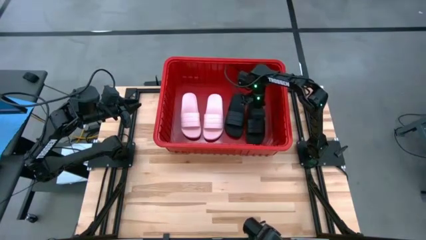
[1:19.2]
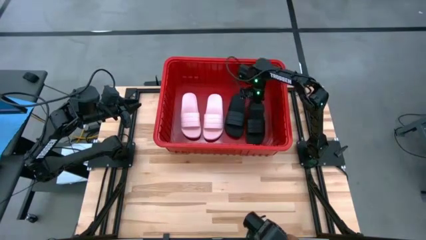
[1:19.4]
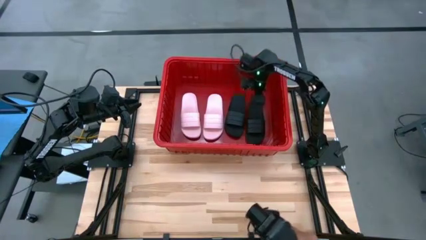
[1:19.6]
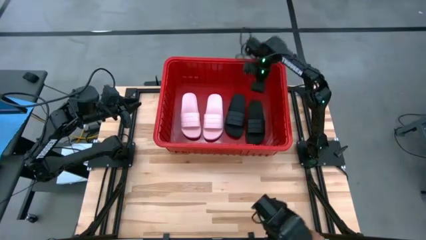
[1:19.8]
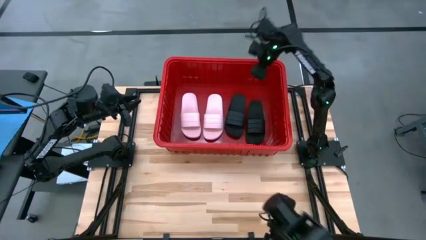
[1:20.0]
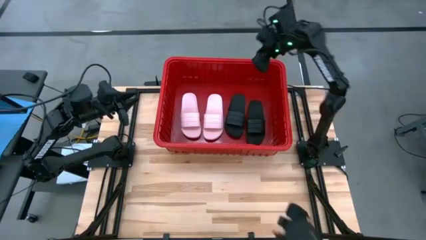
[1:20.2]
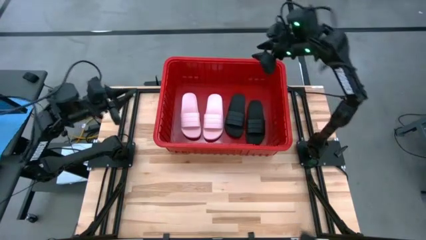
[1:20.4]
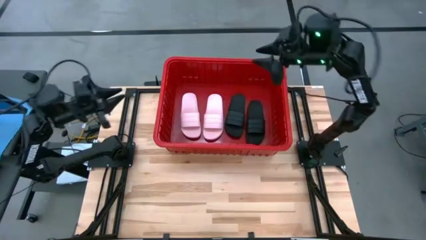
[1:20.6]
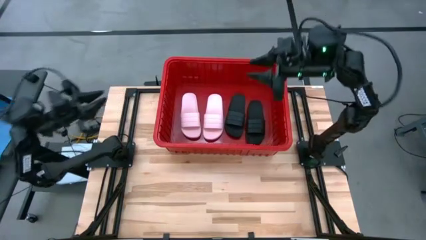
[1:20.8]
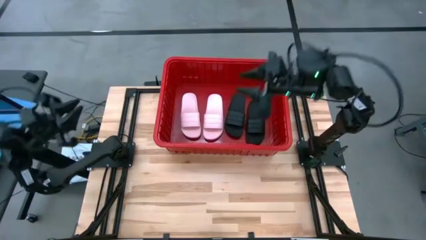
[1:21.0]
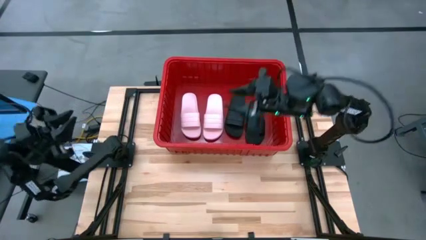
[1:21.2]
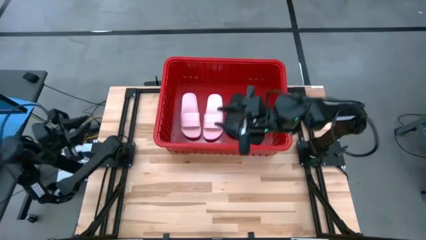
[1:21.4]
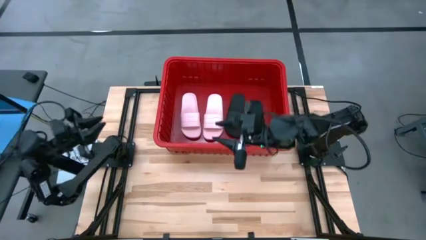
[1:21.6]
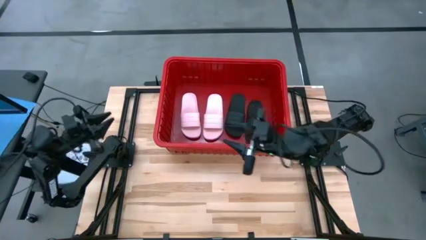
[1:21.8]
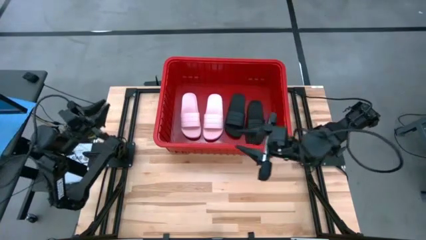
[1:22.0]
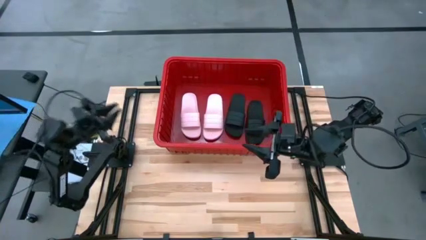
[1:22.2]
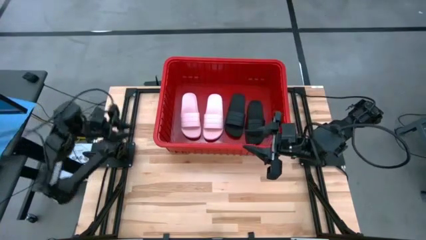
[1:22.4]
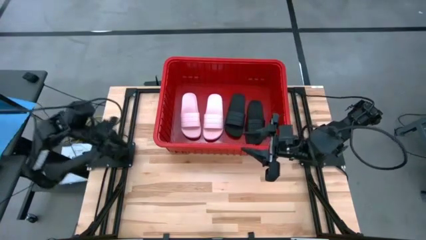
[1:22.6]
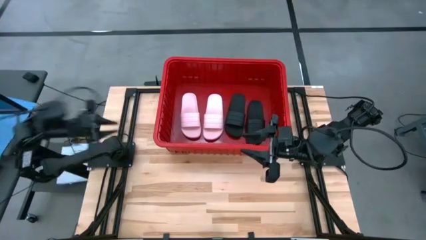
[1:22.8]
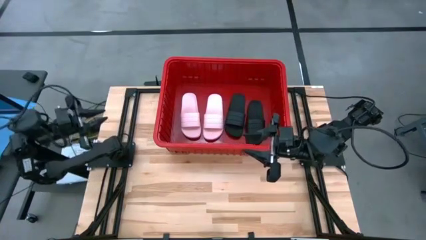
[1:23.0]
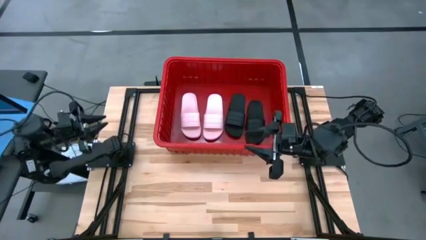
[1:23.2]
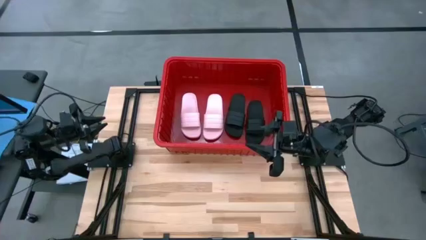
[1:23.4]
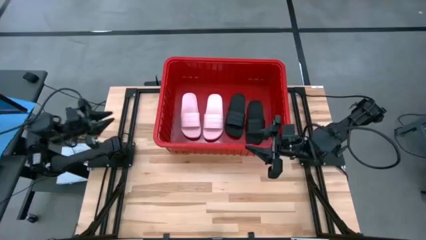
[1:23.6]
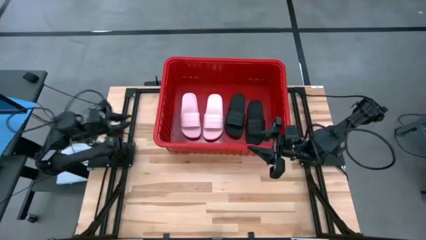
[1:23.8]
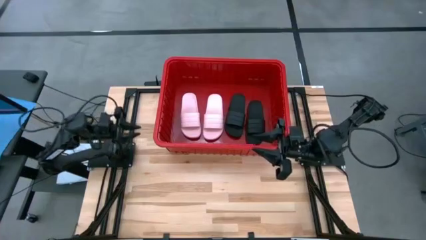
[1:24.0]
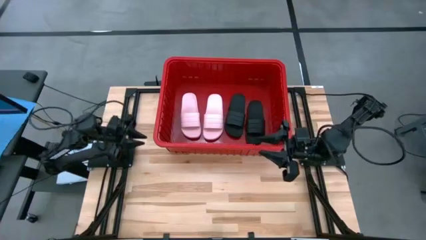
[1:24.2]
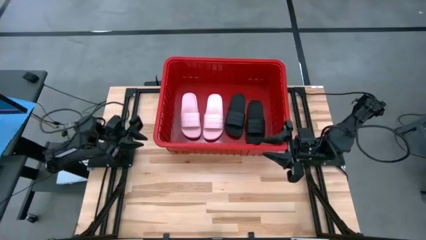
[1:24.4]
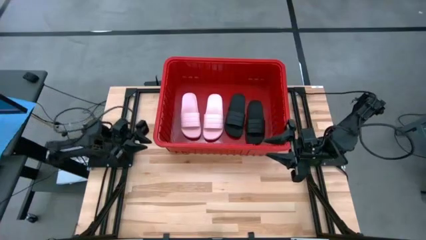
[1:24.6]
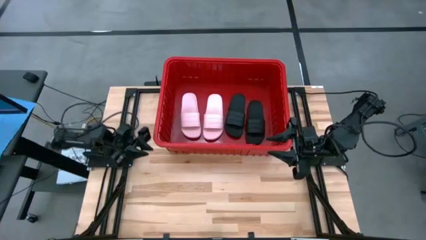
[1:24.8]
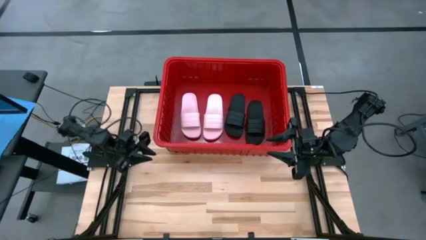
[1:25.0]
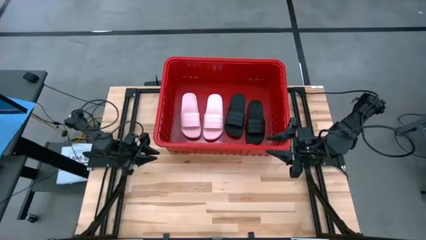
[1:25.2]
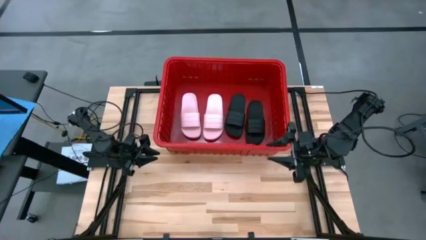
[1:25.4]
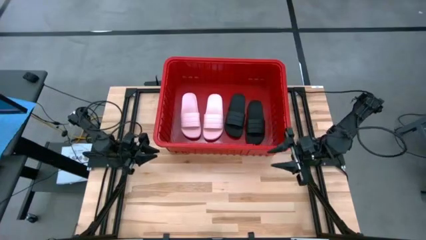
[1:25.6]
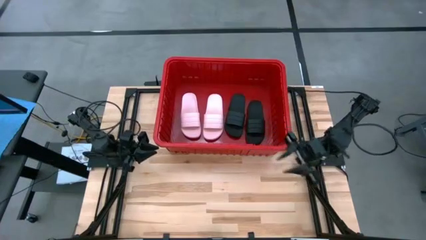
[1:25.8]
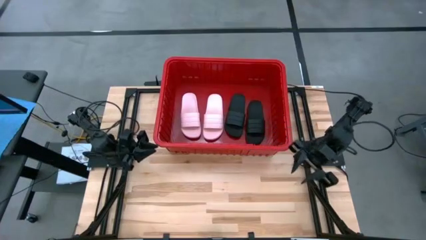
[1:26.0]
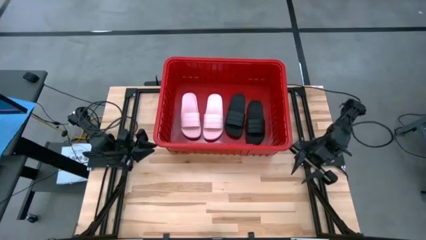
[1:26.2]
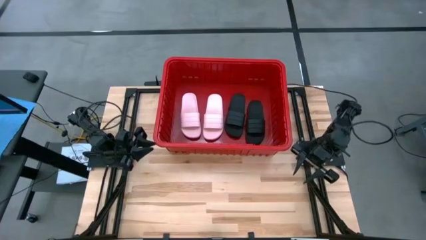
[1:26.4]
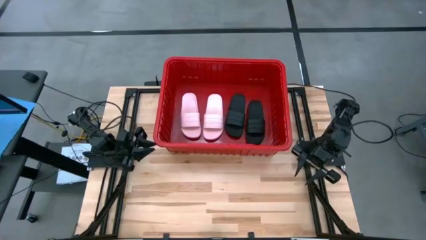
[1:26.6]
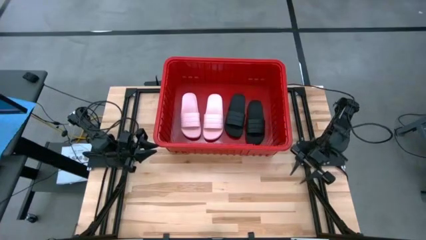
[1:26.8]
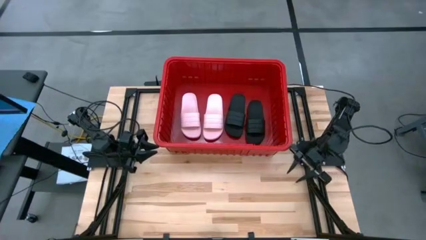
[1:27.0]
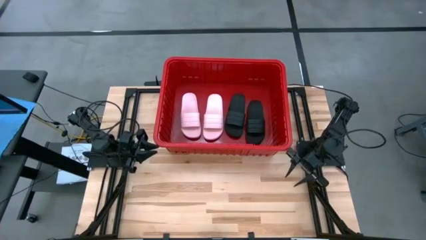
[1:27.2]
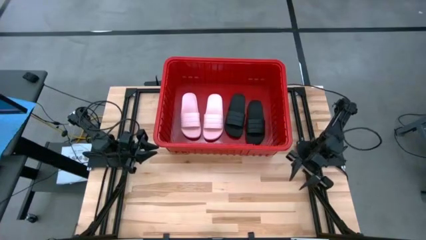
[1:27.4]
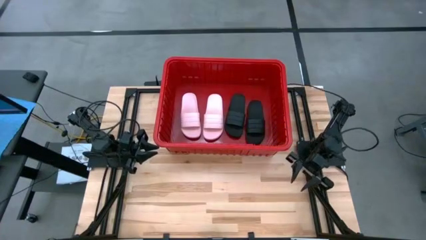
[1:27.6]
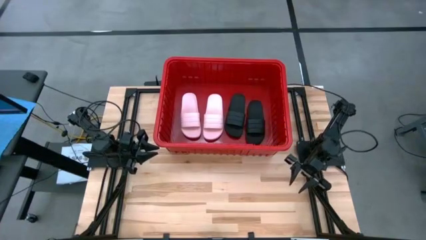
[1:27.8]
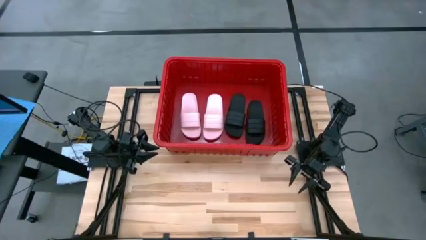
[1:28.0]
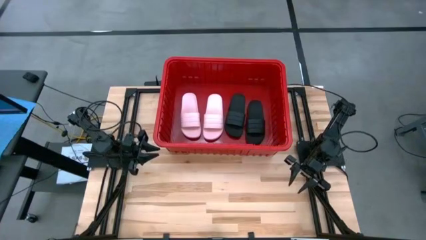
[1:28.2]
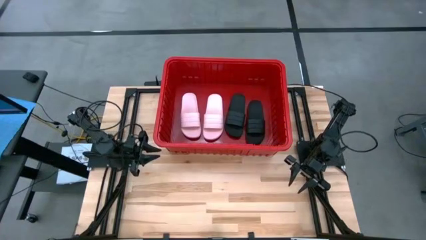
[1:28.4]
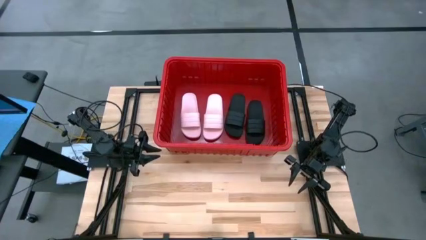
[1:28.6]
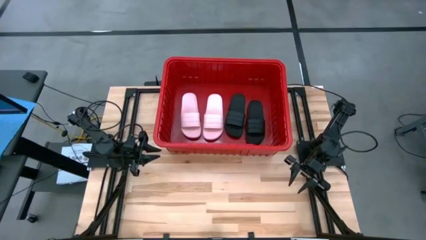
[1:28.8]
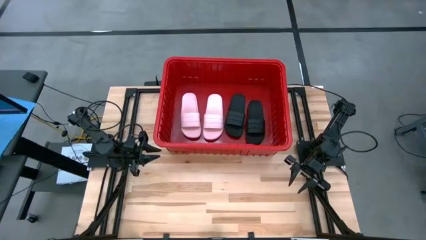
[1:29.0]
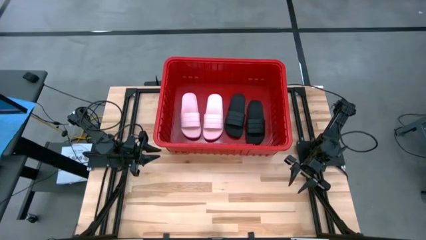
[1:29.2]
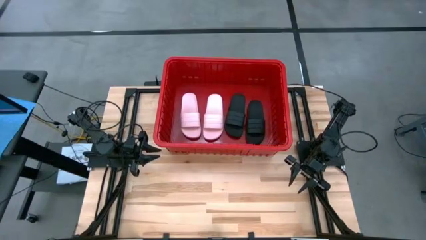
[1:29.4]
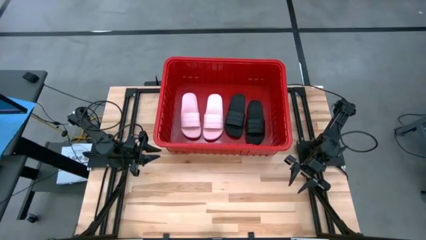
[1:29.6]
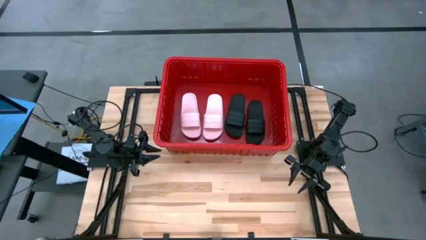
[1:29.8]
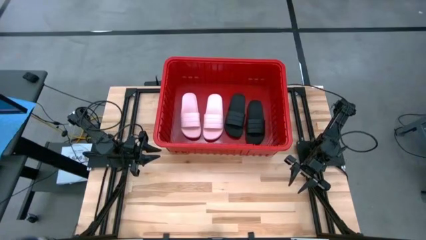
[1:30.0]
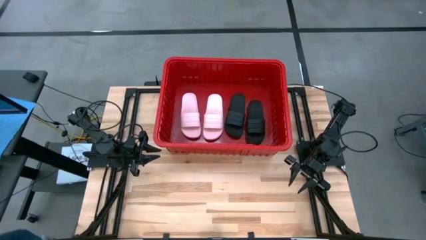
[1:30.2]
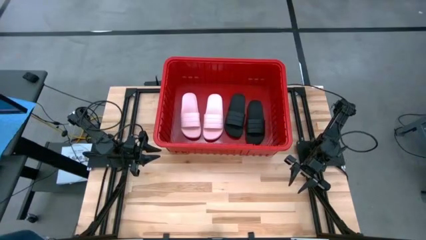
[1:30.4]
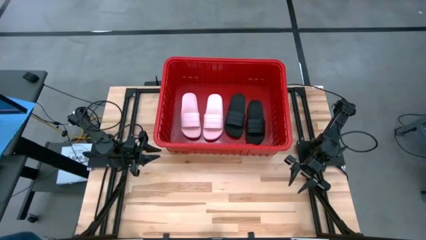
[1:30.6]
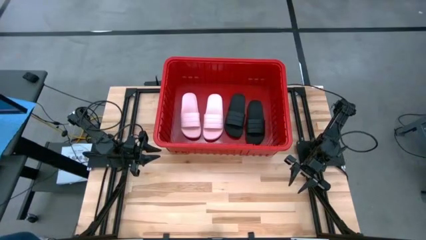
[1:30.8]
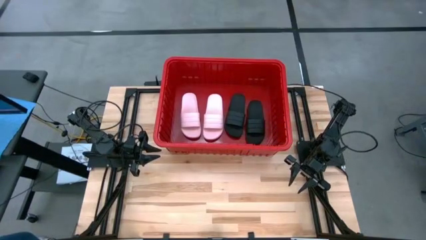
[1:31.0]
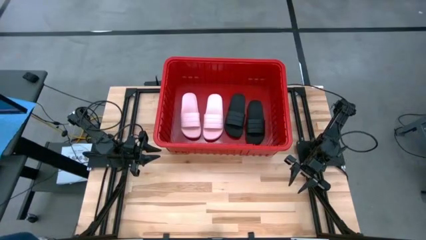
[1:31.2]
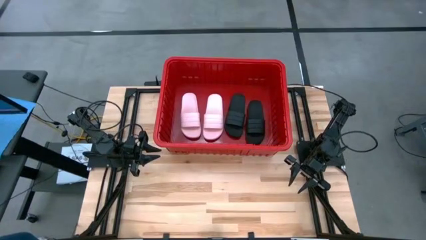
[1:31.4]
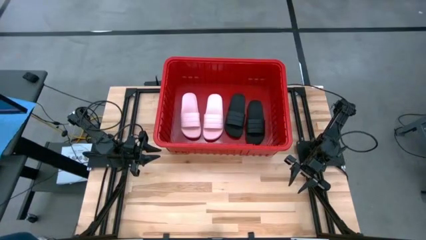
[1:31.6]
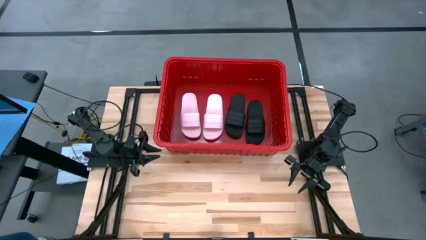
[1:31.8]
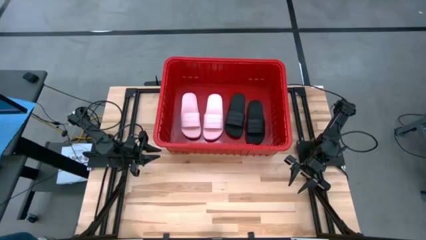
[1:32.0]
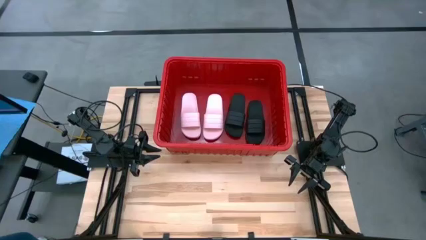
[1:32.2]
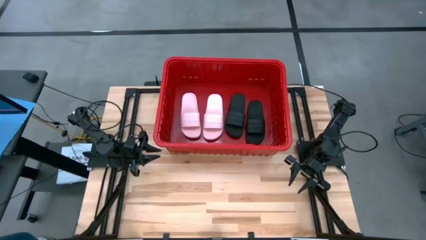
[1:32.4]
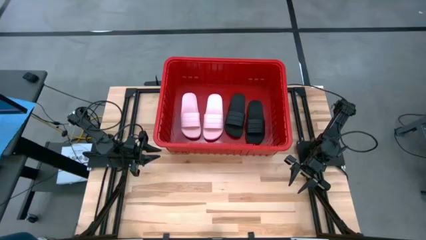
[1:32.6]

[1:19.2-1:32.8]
Task: Pick and place slides into bin
Return to Home Position
